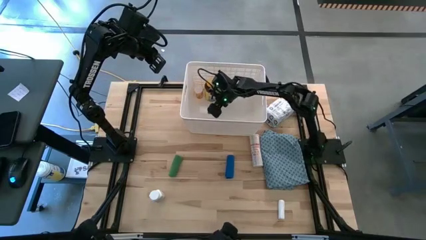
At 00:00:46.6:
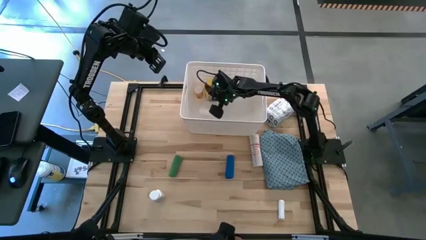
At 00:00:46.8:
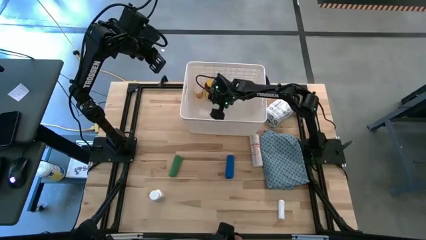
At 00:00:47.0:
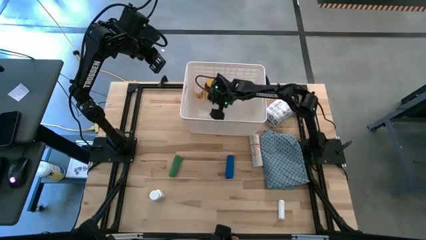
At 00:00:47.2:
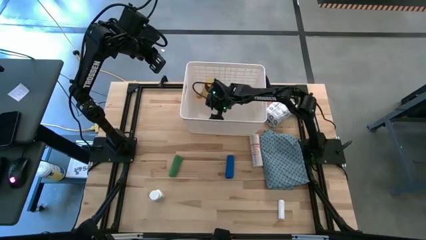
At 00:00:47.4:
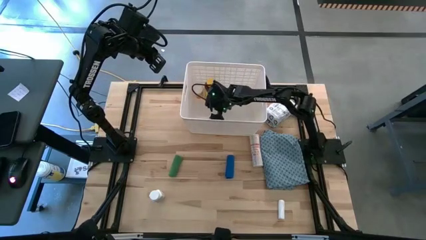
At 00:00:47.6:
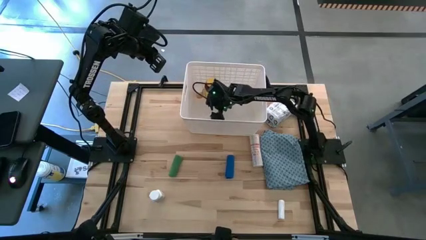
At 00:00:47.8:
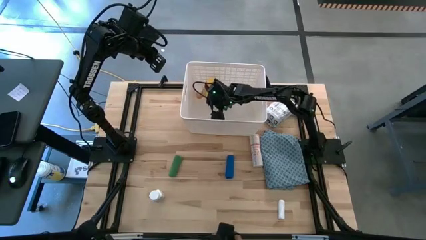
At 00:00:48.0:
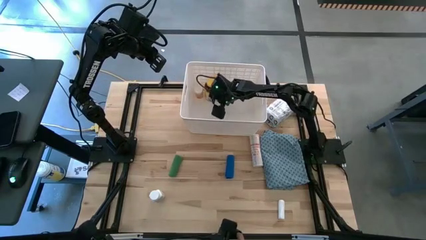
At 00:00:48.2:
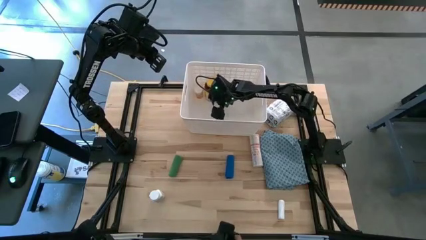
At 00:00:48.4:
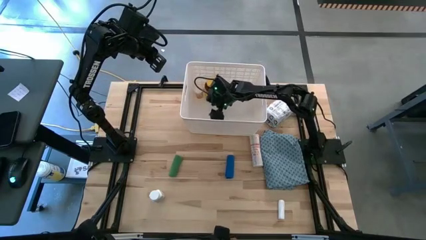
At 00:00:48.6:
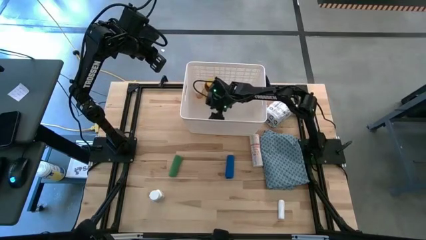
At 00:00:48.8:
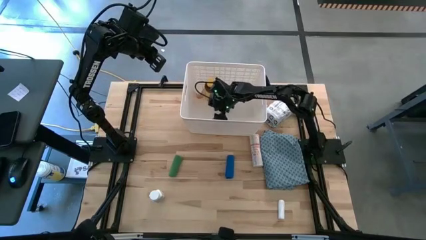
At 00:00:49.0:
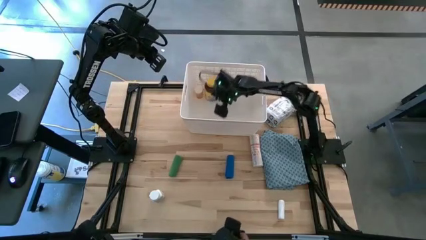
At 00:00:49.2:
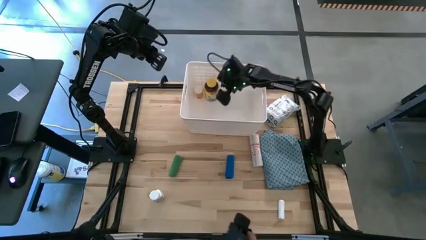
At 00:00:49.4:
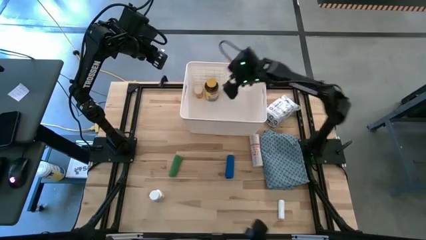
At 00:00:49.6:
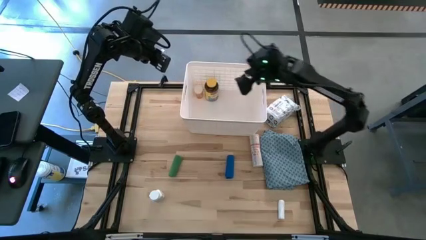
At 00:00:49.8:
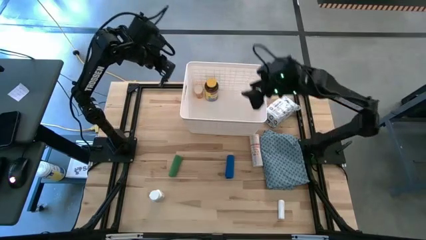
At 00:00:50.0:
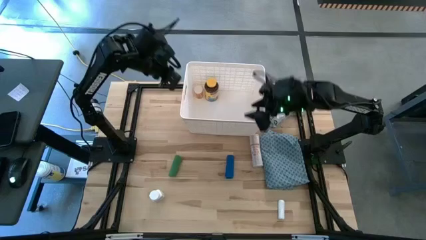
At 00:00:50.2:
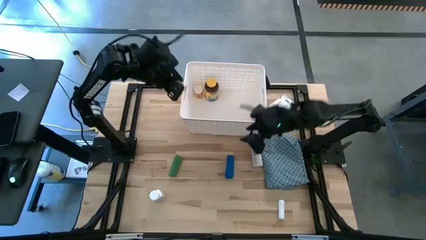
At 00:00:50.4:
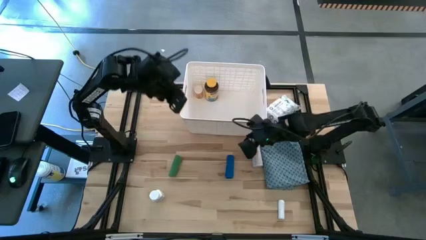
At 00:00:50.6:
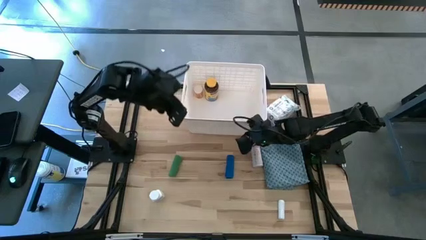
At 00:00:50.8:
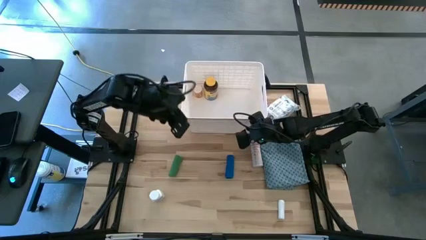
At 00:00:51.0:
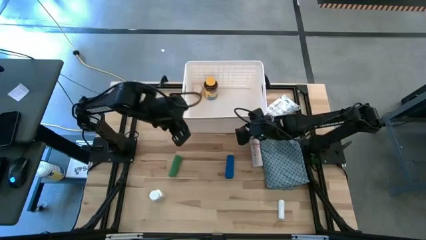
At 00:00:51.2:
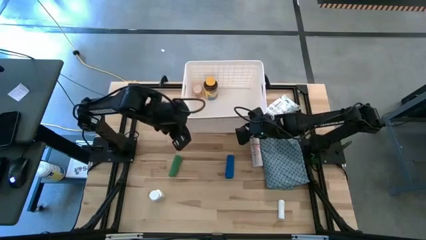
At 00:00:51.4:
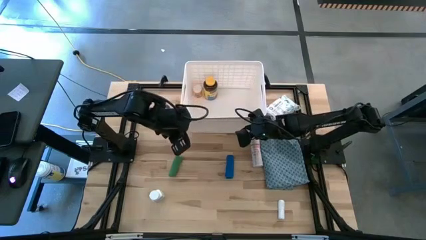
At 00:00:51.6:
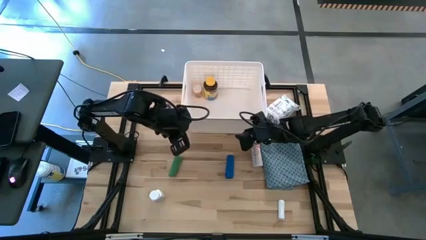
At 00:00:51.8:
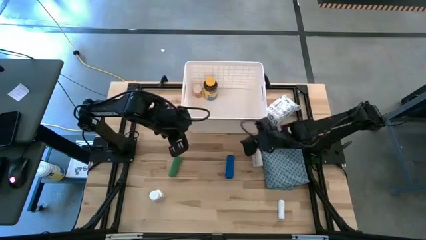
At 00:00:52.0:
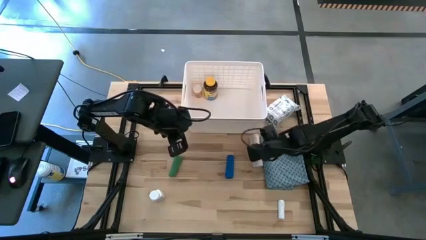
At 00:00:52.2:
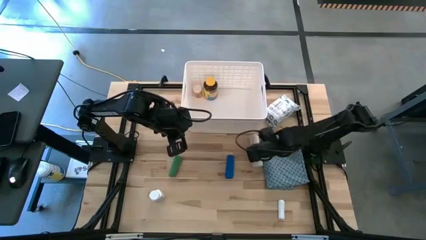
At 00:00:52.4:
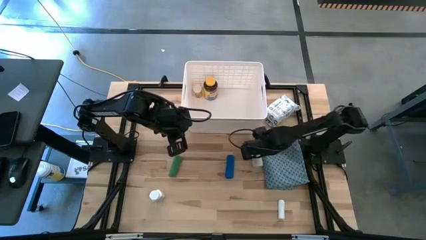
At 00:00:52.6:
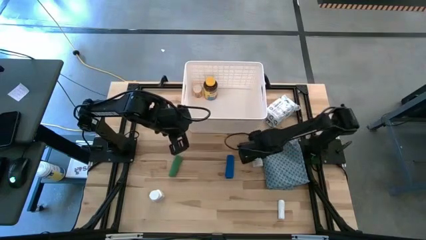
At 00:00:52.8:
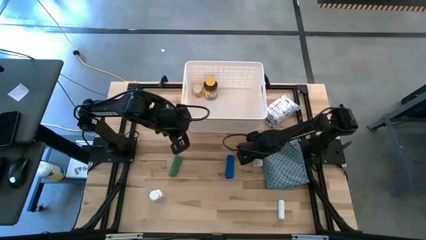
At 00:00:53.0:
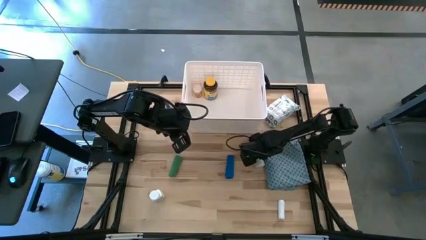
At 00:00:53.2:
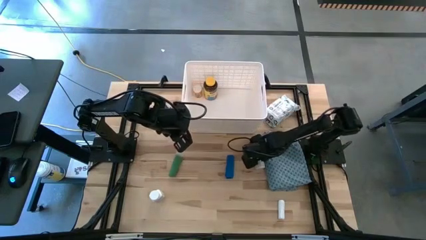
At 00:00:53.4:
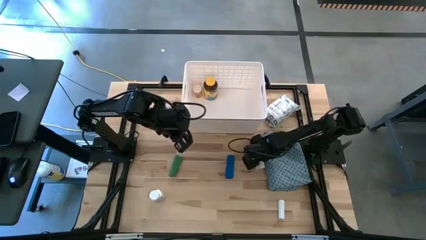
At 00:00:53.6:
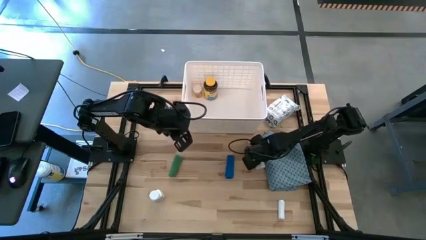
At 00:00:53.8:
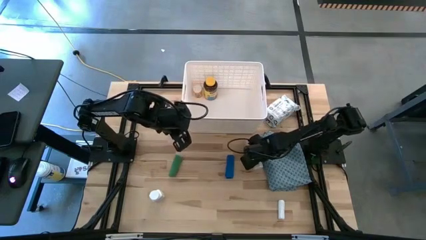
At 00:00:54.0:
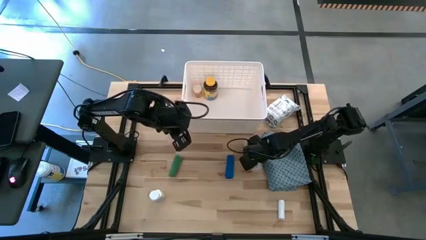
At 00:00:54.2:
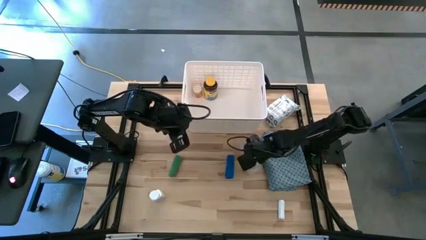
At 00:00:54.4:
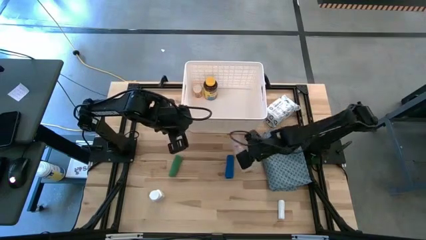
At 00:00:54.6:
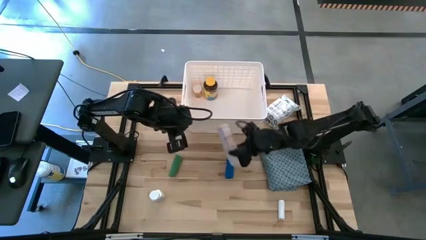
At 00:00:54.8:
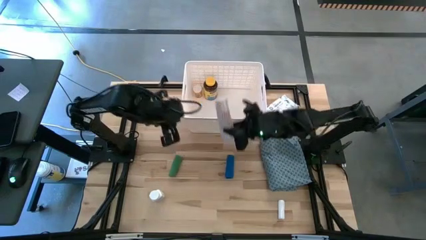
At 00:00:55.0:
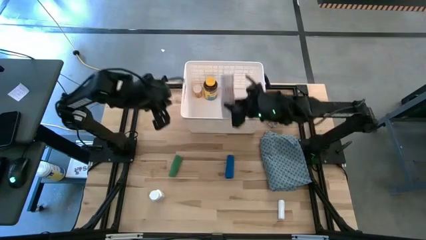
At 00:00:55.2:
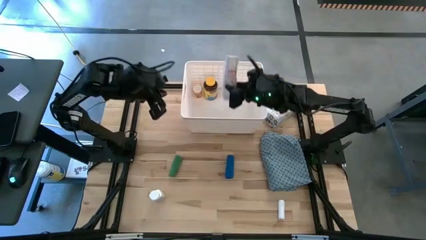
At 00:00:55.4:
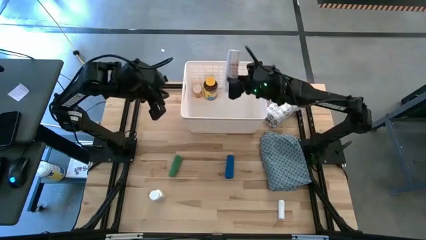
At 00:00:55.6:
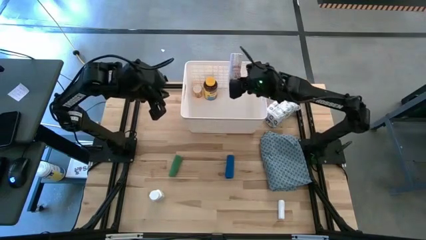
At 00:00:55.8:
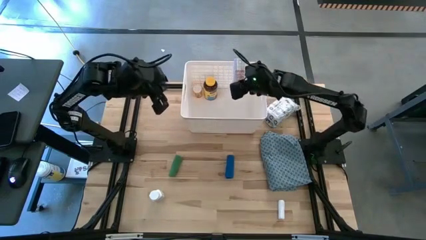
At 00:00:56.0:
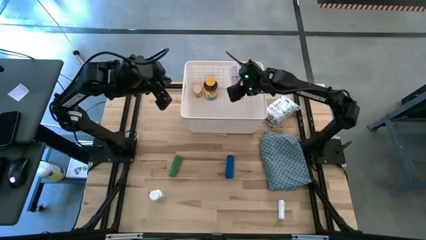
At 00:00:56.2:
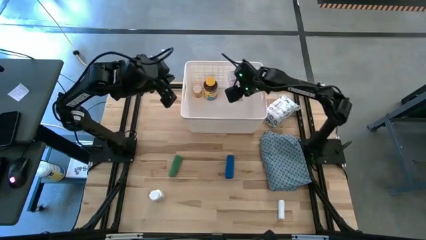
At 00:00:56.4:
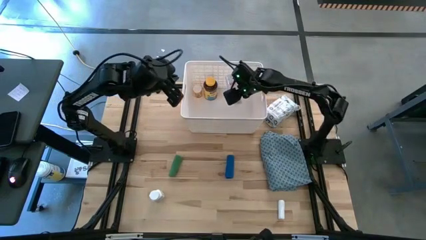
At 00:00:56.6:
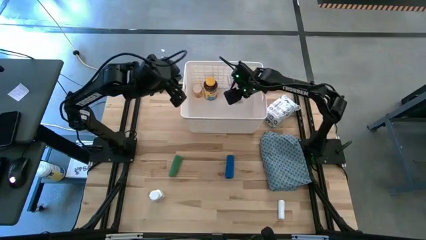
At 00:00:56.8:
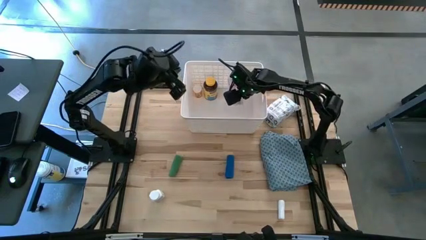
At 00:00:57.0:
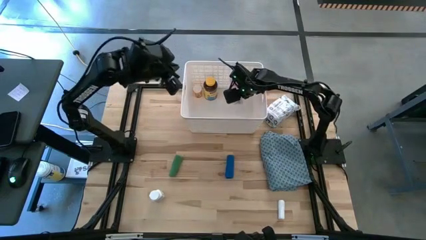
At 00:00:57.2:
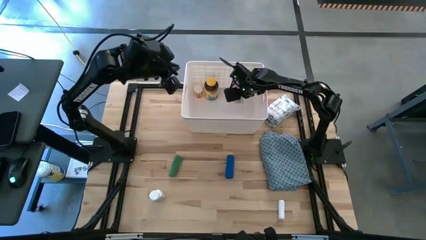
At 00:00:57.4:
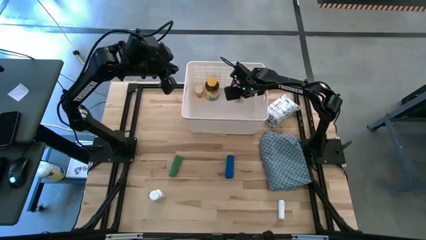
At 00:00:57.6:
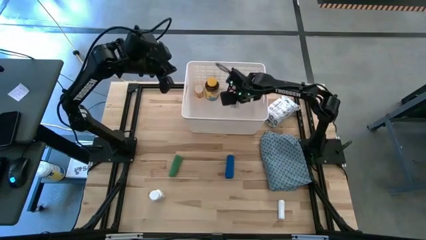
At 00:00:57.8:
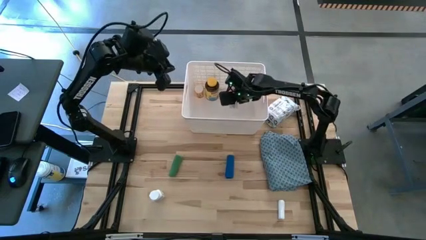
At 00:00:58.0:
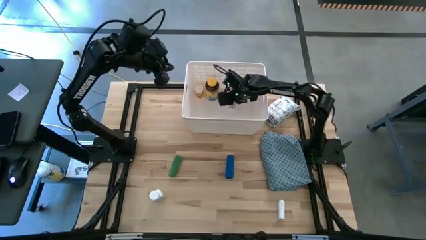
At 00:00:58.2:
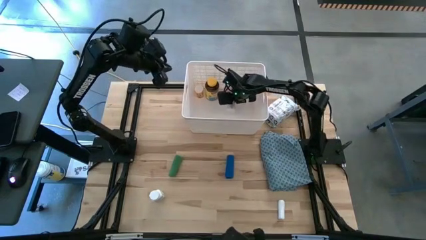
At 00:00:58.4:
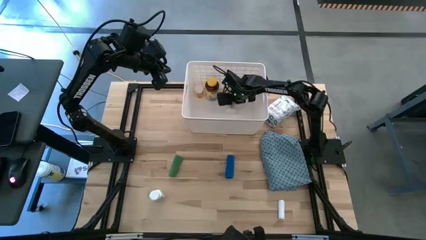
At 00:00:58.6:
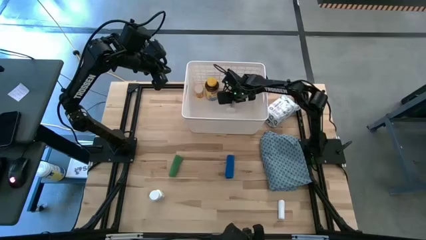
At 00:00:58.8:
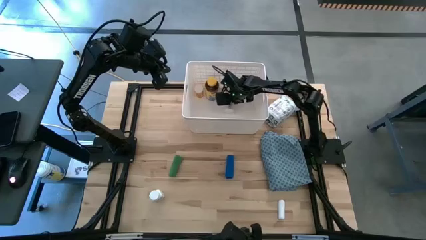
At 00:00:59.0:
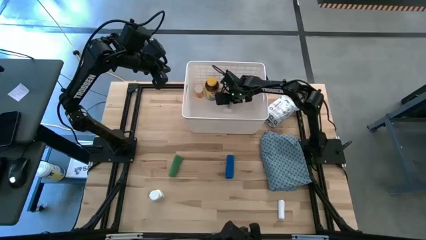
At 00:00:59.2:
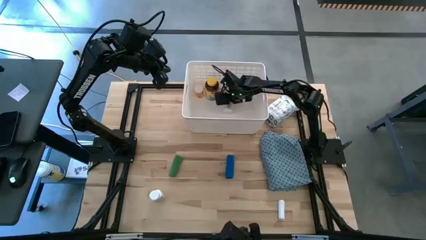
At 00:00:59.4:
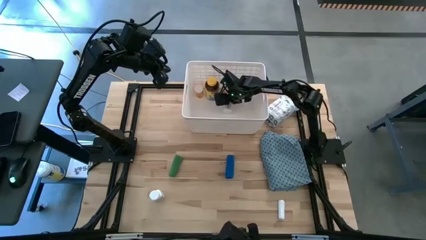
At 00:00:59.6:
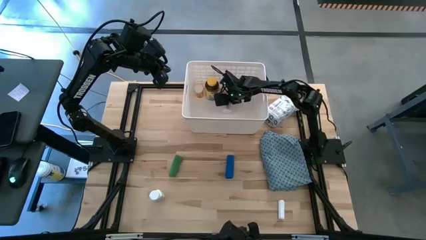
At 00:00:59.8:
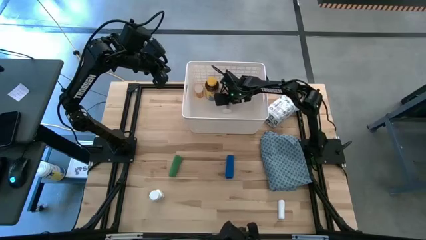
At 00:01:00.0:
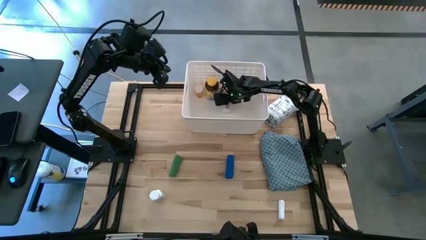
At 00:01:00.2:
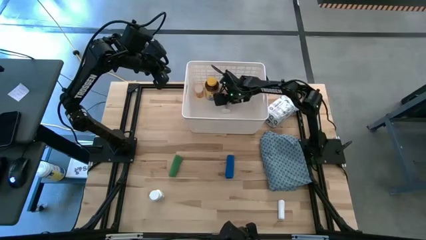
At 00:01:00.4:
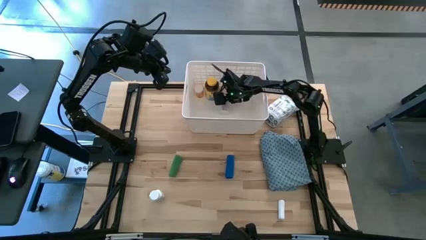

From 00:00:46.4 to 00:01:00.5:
Task: Pick & place medical supplies in basket/bin
Put the white bandage into the white bin
